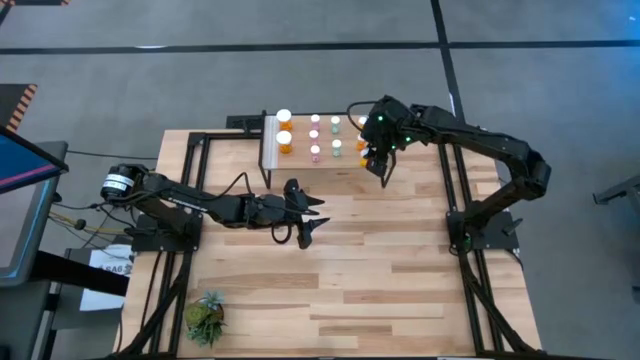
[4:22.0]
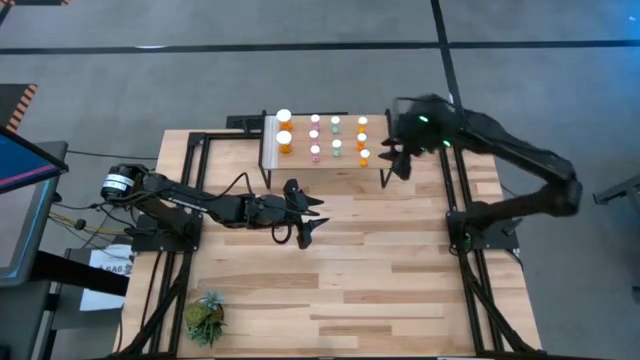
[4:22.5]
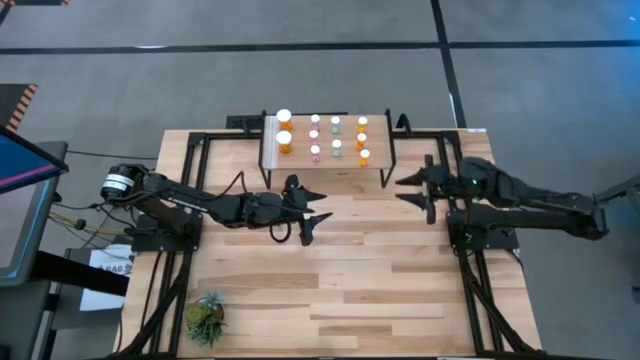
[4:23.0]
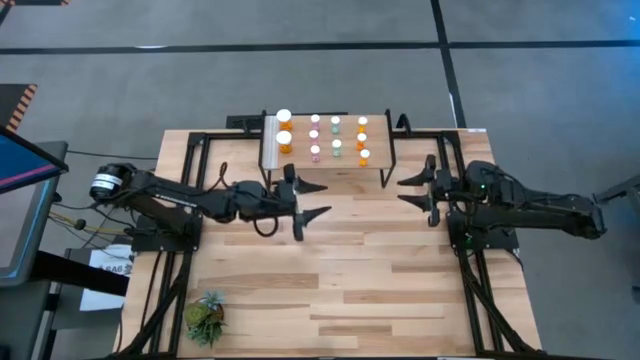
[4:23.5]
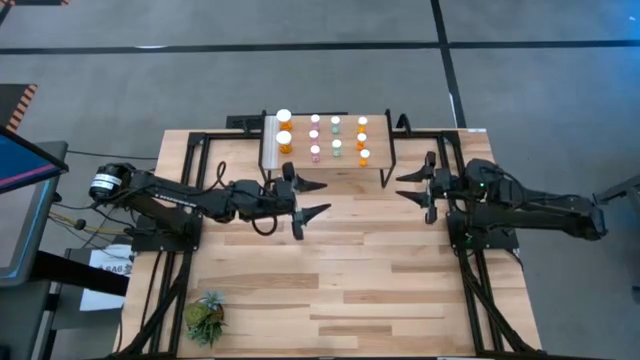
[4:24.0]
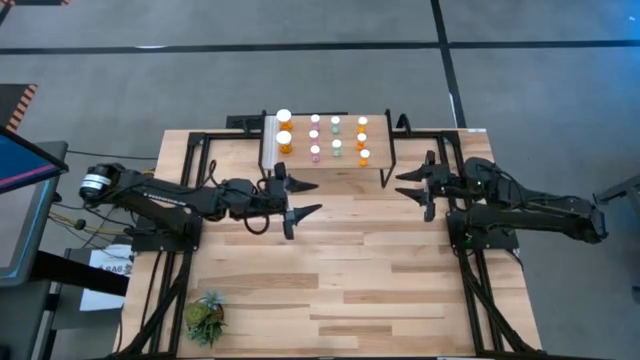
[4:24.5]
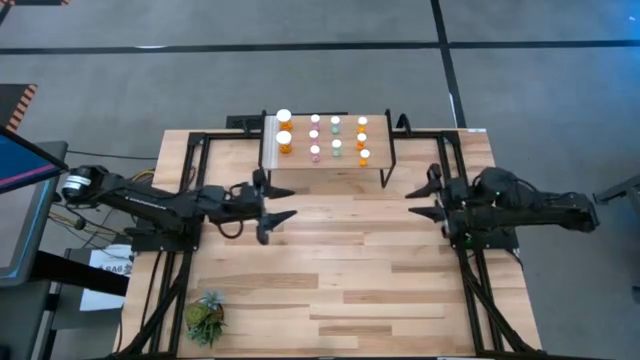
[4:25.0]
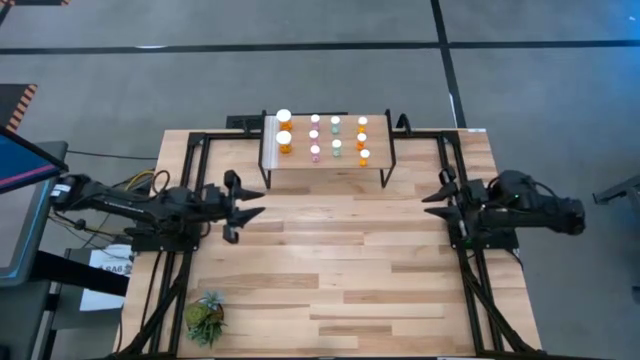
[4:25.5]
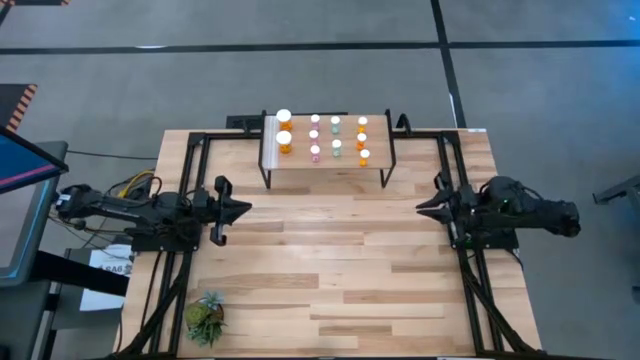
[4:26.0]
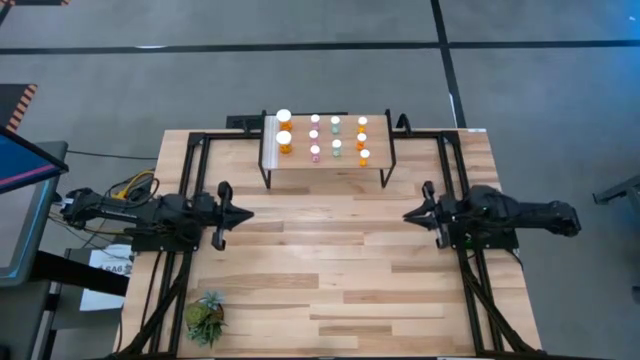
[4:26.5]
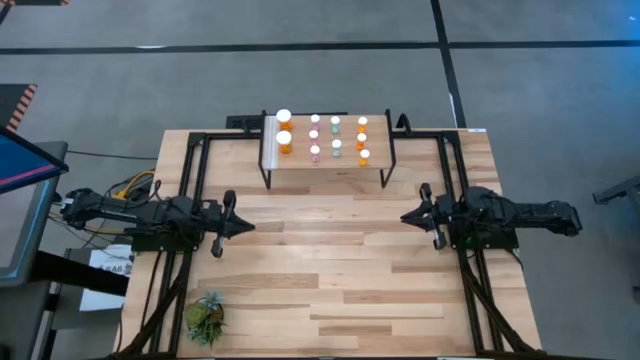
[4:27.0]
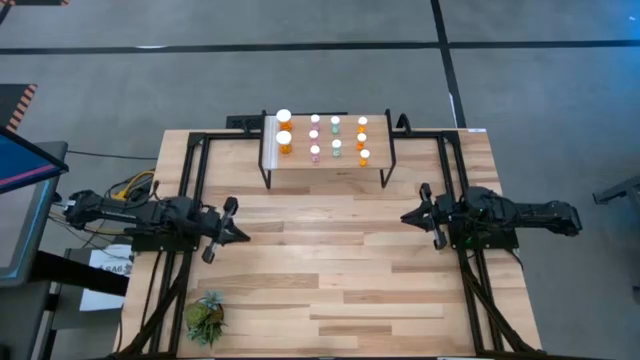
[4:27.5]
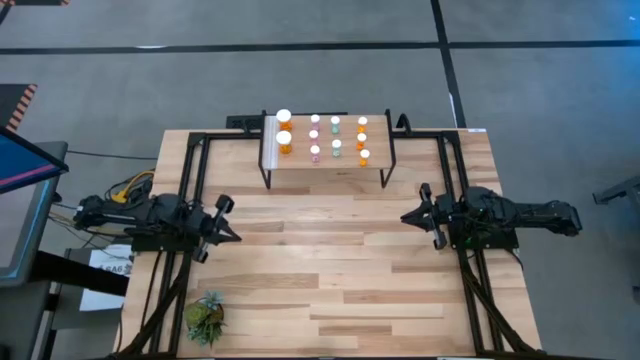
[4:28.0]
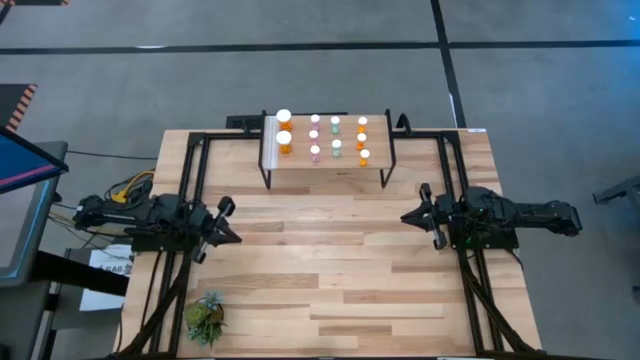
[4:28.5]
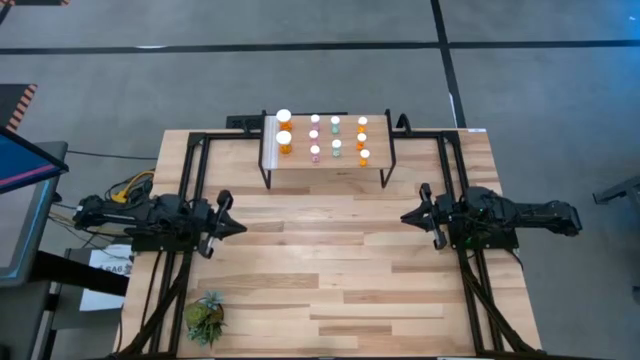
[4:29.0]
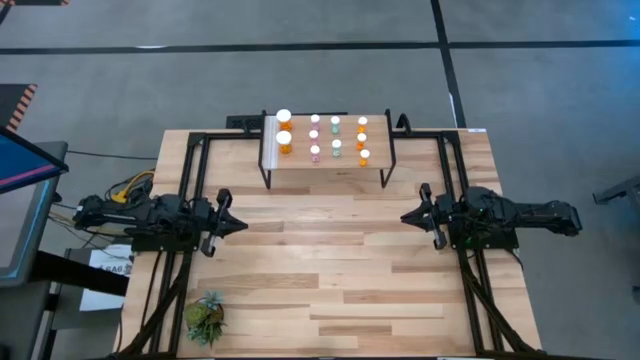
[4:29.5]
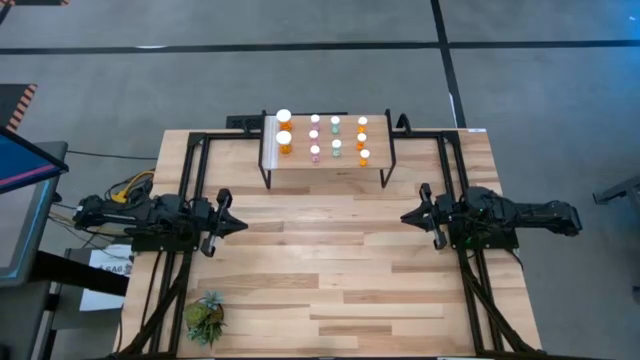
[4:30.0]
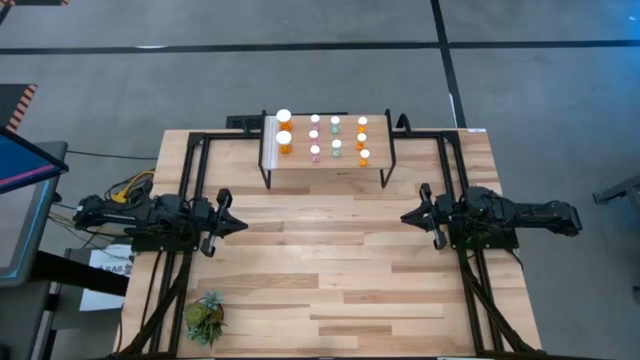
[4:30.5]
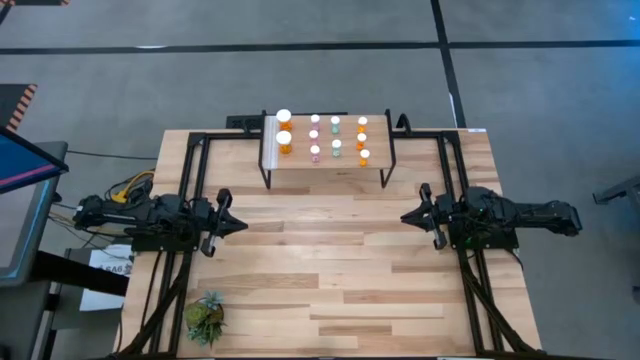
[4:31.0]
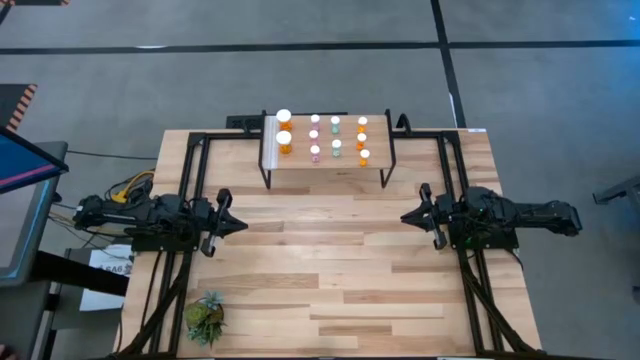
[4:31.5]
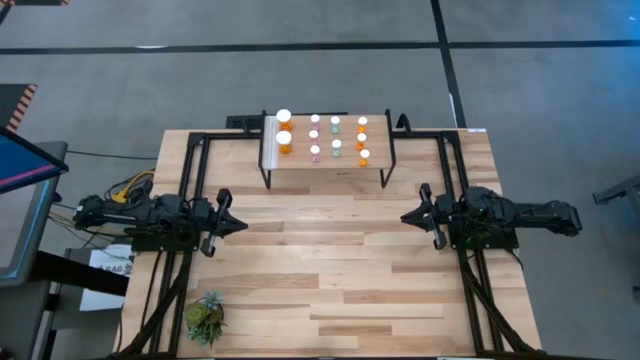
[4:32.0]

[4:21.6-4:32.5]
Task: Pick and place medicine bottles onto shelf by color
Return to Home Position

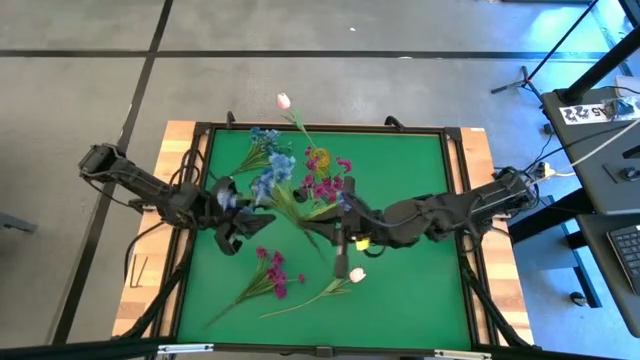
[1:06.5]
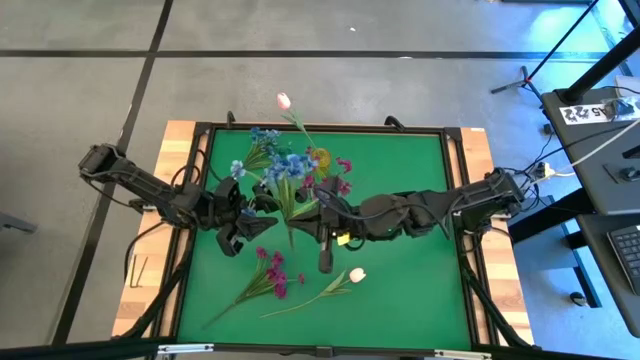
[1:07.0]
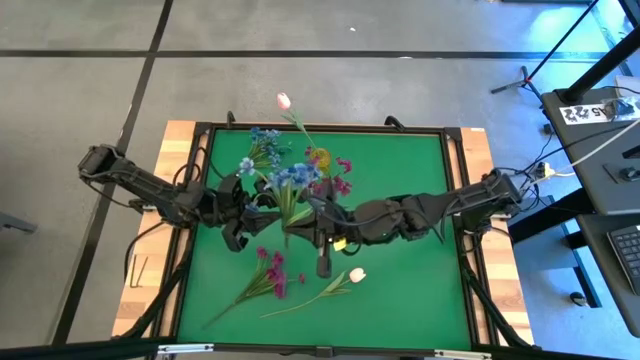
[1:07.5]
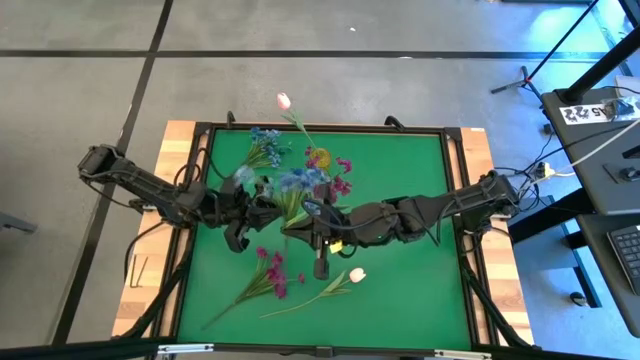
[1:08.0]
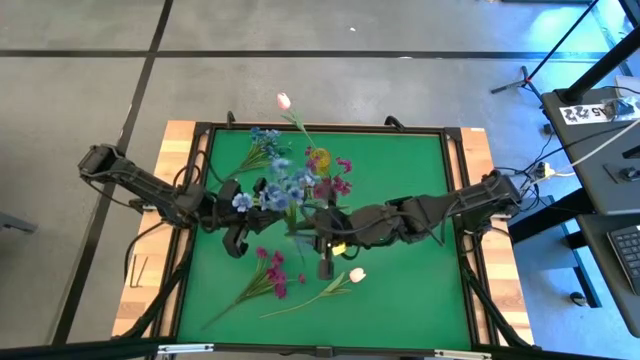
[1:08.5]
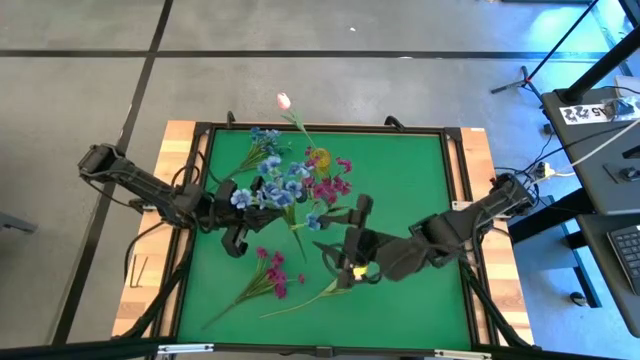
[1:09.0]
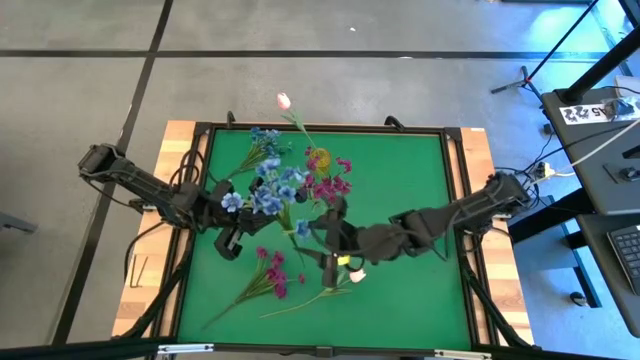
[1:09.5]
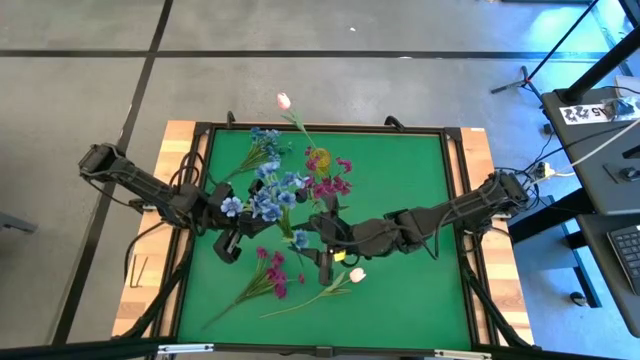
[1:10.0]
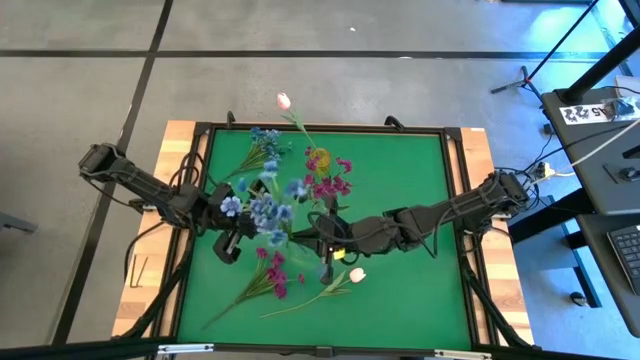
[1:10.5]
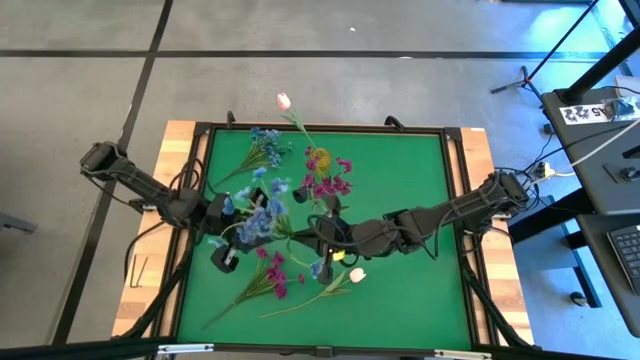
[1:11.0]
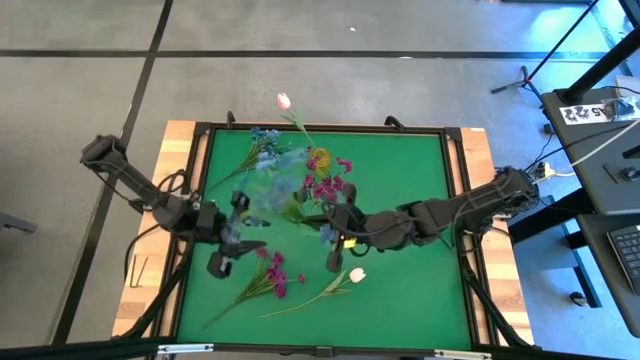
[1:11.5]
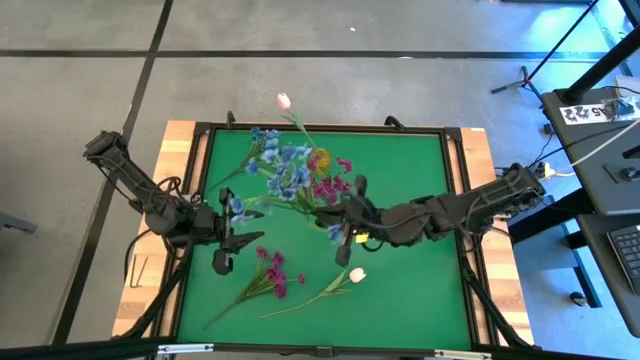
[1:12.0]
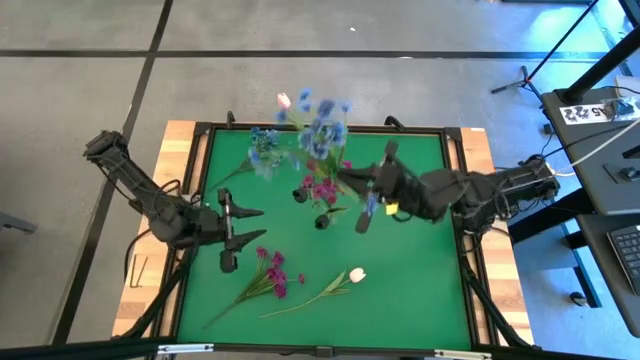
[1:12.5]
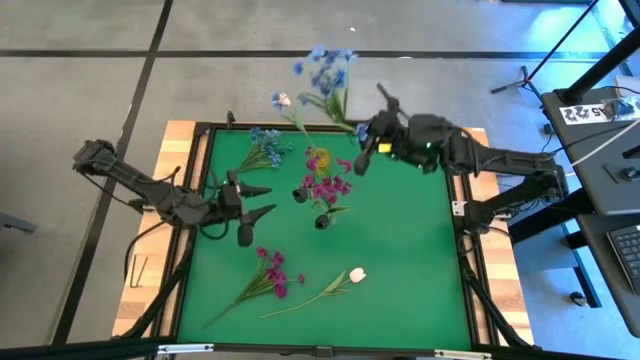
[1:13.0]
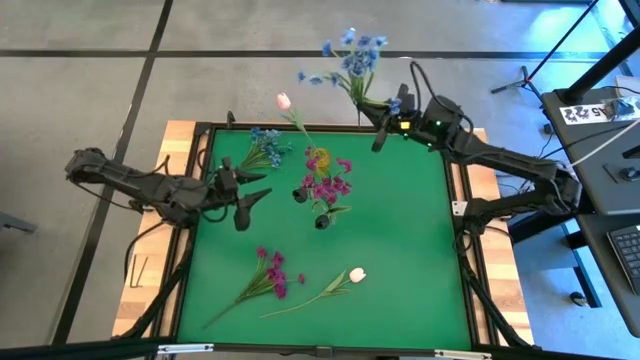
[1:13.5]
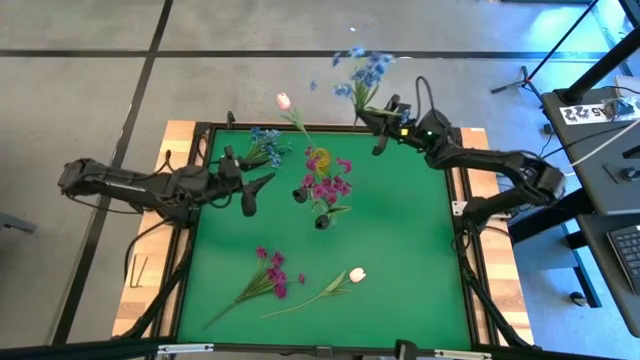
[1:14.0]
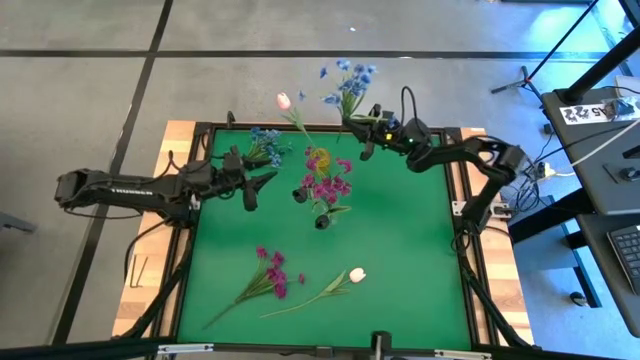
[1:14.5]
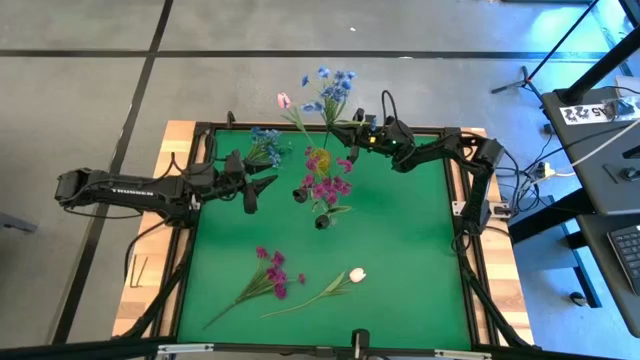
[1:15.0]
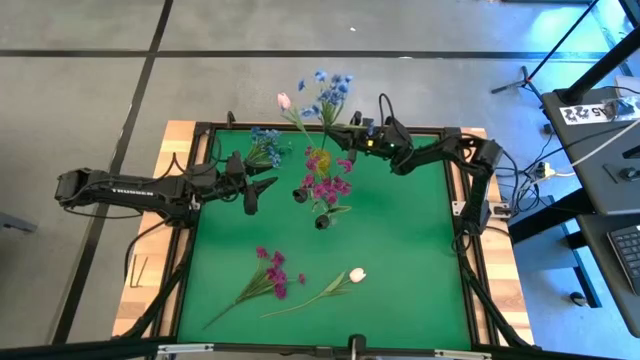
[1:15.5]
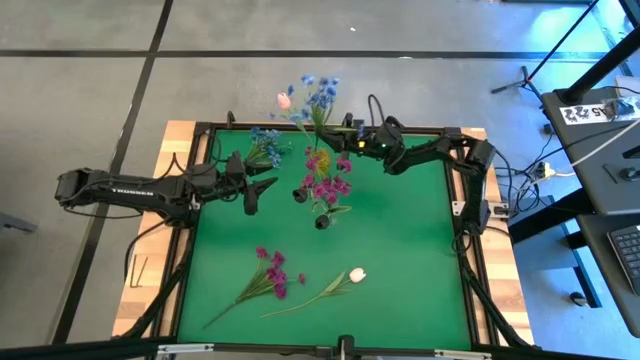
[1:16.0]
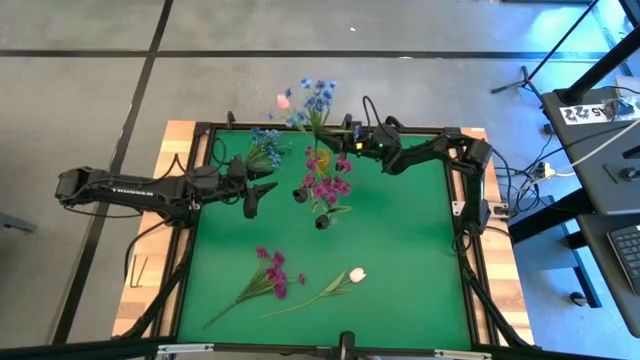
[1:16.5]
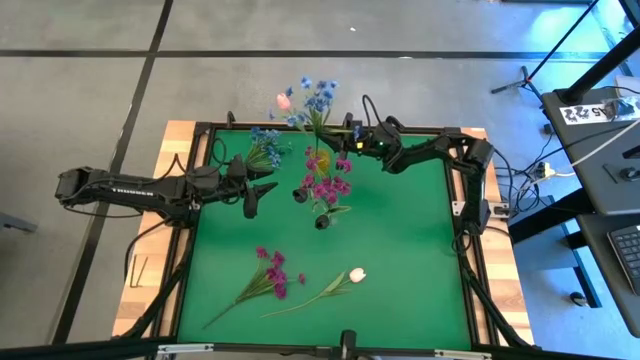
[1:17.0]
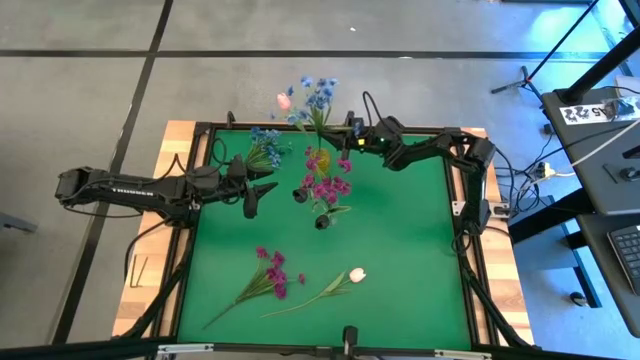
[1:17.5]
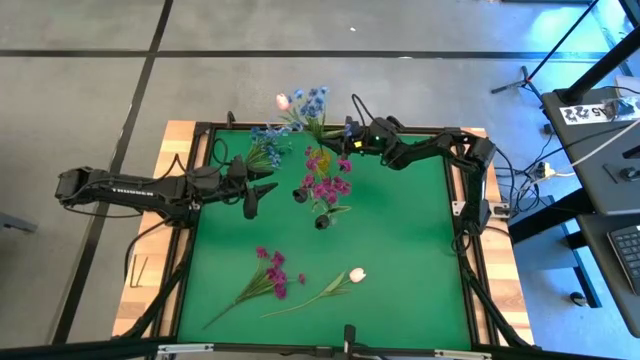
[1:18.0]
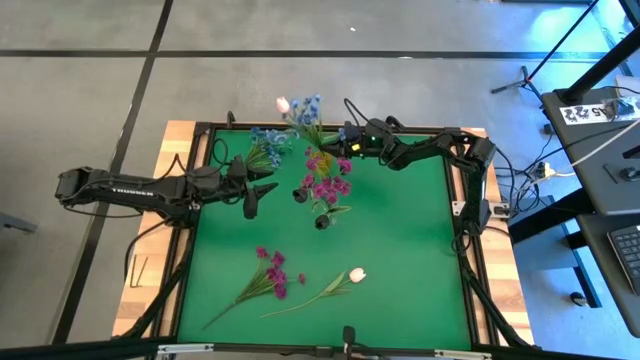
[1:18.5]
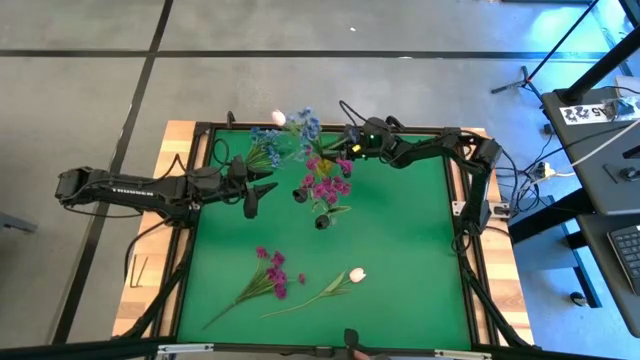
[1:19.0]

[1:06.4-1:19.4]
Task: Sort flowers into vase by color
Put the bottom blue flowers into the yellow vase
